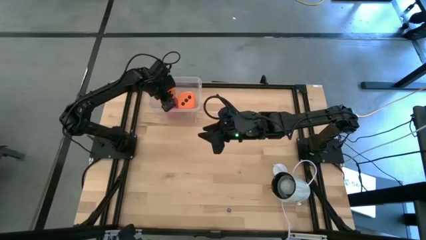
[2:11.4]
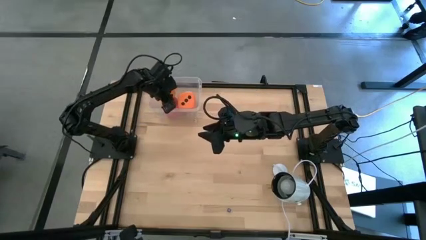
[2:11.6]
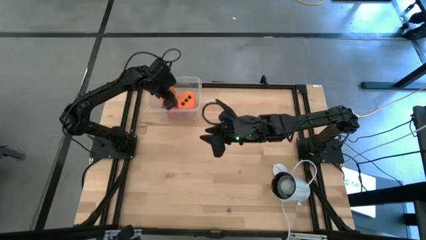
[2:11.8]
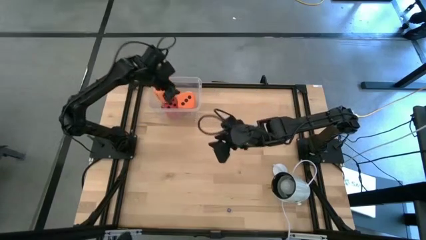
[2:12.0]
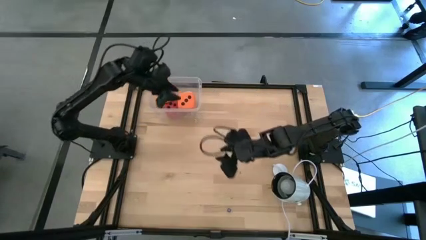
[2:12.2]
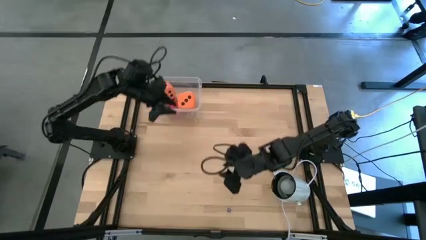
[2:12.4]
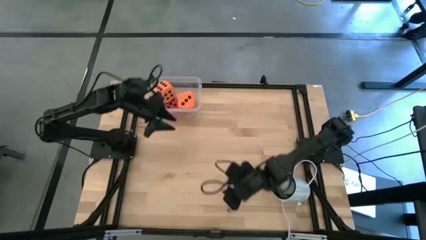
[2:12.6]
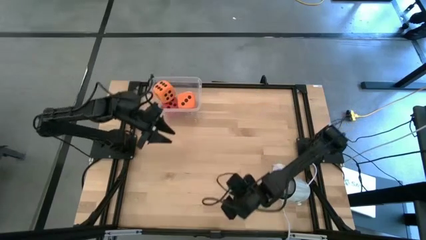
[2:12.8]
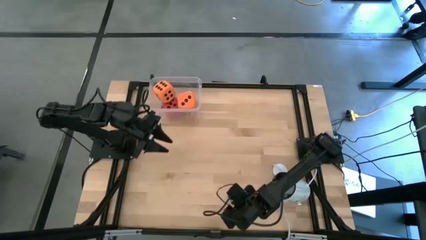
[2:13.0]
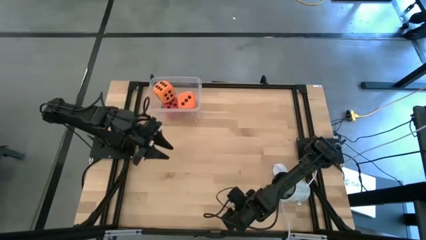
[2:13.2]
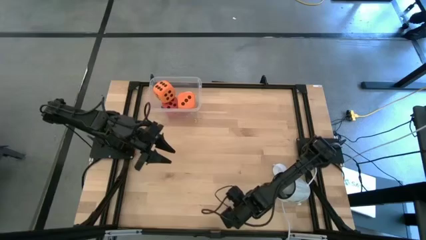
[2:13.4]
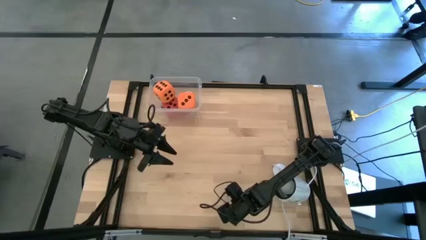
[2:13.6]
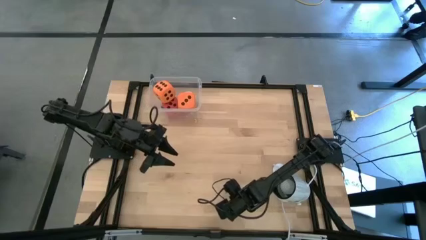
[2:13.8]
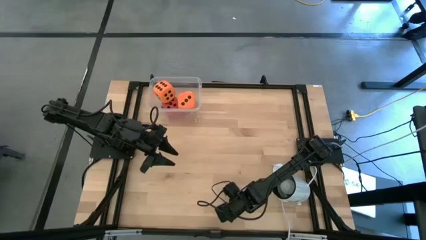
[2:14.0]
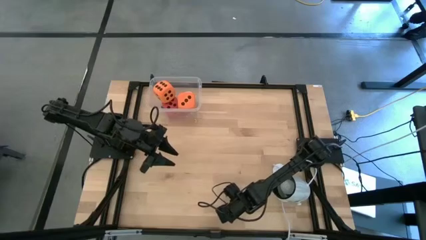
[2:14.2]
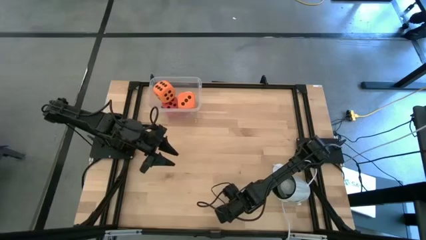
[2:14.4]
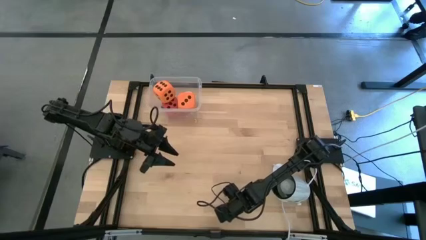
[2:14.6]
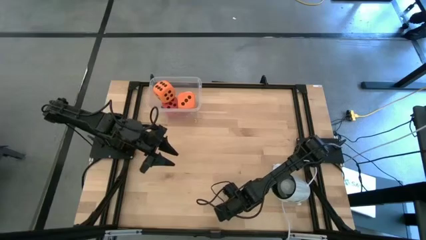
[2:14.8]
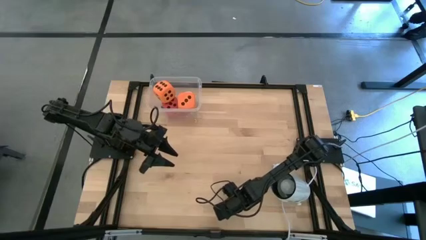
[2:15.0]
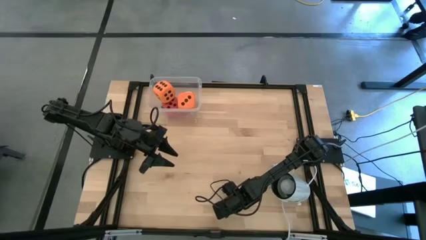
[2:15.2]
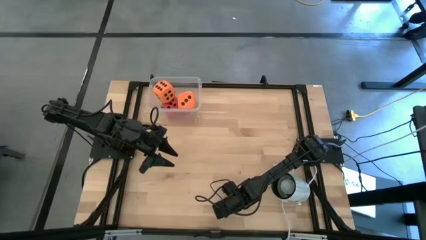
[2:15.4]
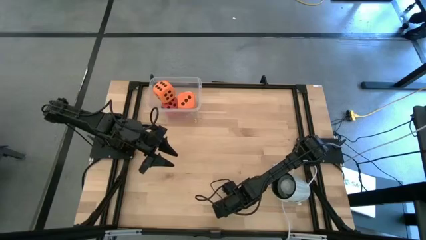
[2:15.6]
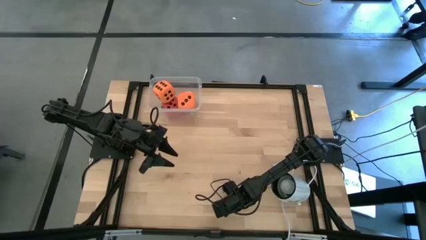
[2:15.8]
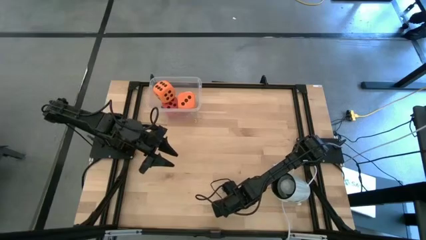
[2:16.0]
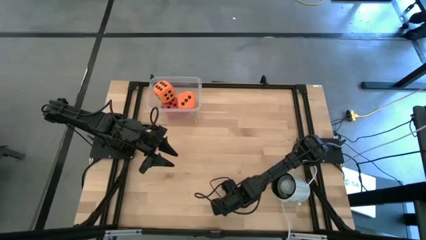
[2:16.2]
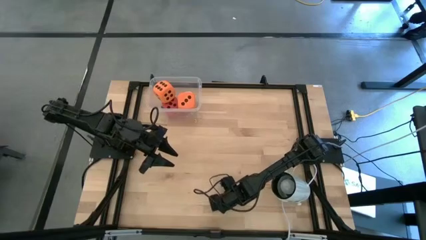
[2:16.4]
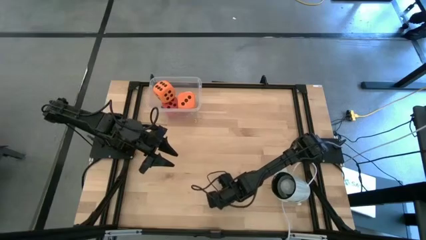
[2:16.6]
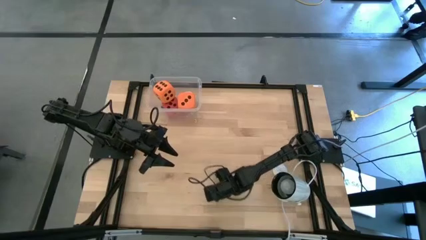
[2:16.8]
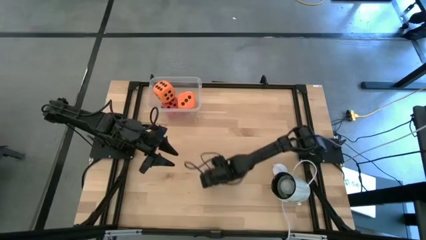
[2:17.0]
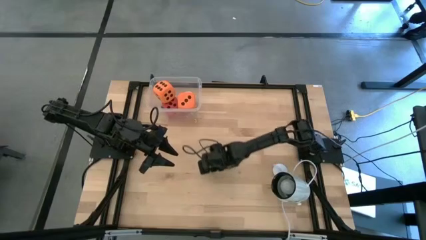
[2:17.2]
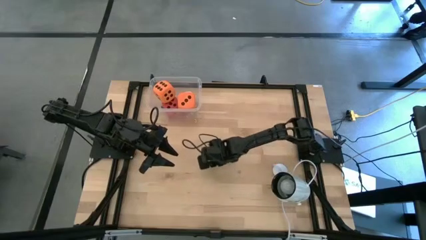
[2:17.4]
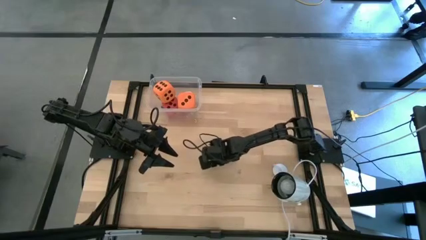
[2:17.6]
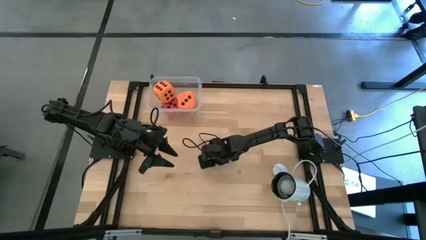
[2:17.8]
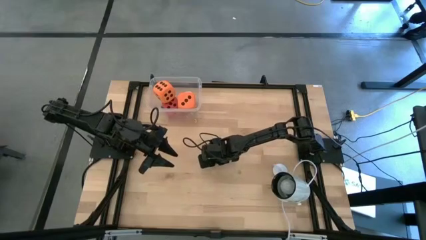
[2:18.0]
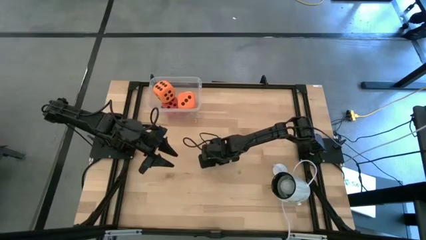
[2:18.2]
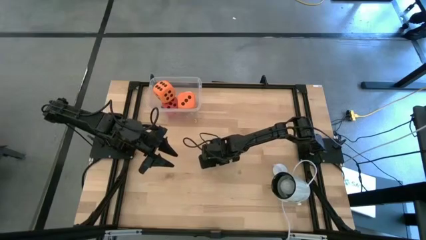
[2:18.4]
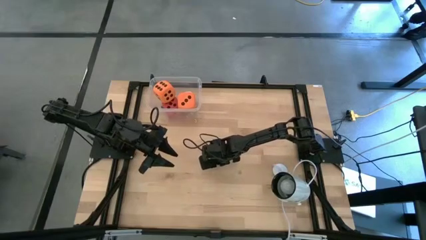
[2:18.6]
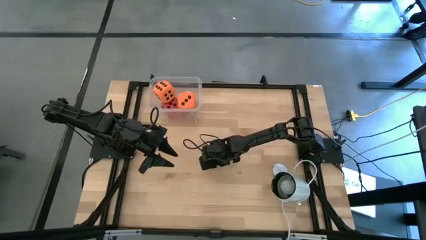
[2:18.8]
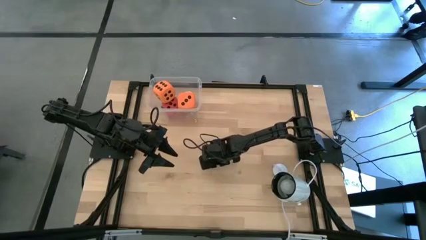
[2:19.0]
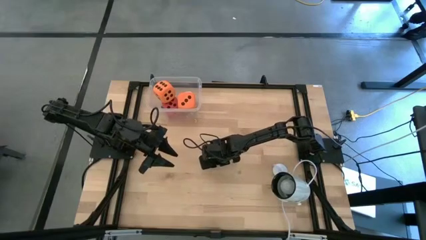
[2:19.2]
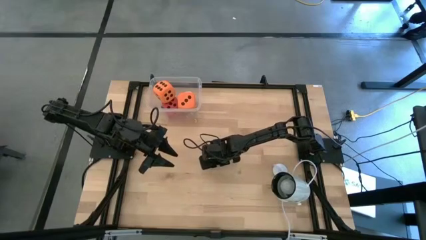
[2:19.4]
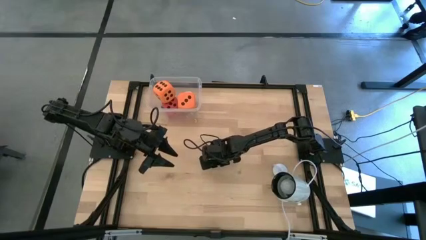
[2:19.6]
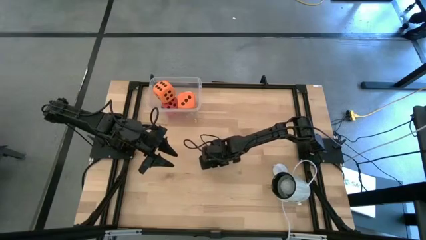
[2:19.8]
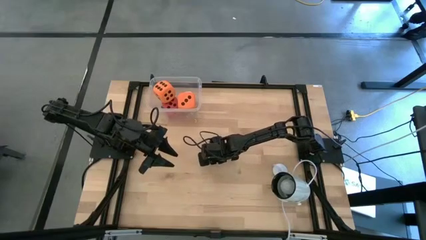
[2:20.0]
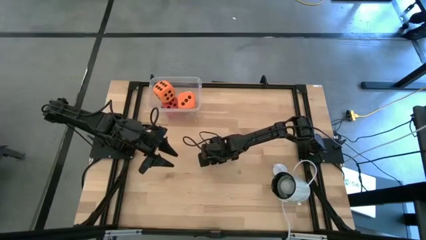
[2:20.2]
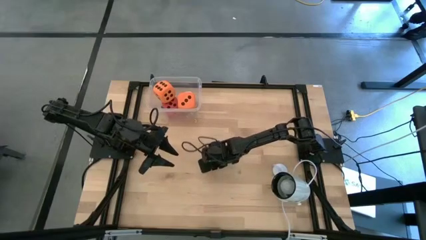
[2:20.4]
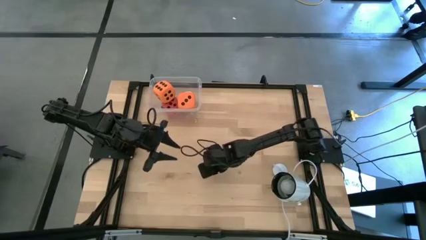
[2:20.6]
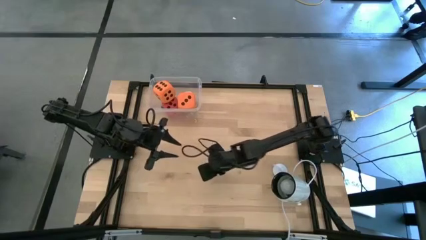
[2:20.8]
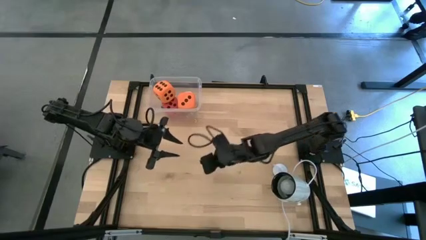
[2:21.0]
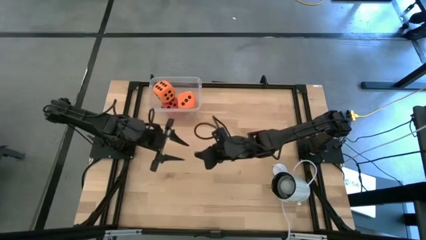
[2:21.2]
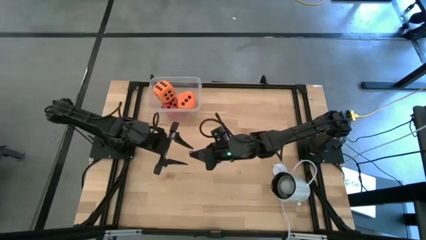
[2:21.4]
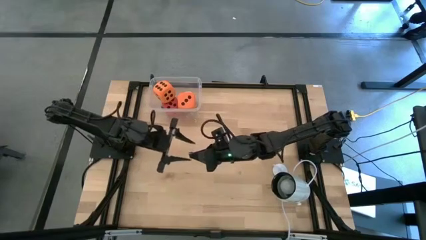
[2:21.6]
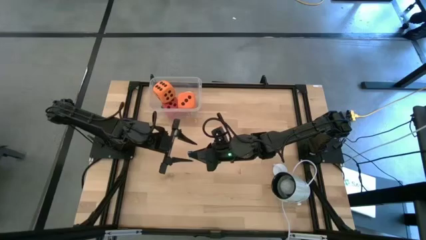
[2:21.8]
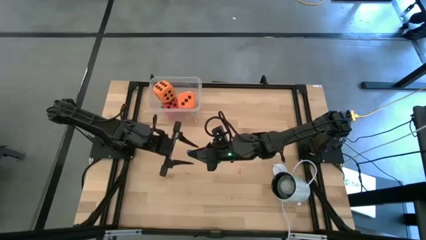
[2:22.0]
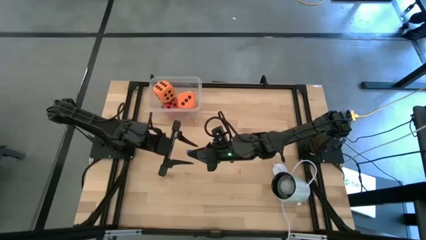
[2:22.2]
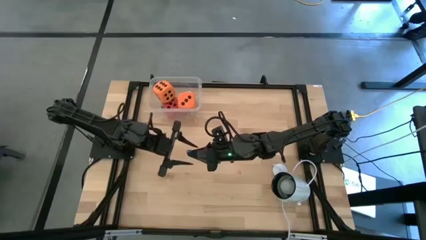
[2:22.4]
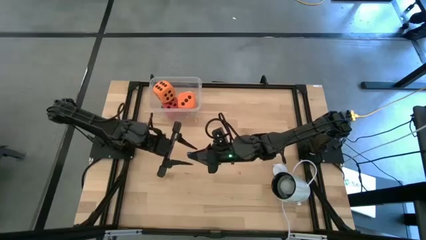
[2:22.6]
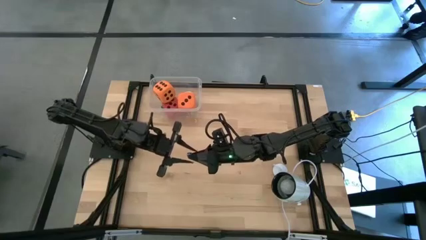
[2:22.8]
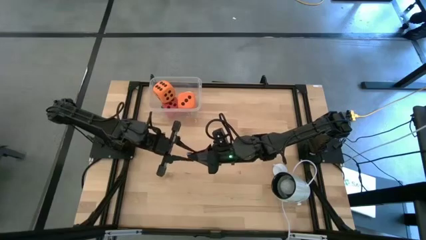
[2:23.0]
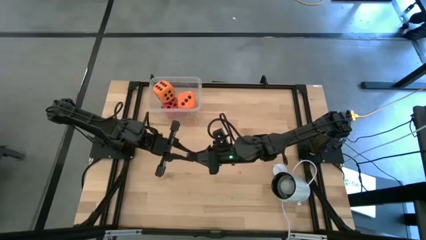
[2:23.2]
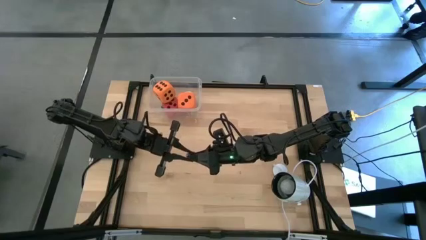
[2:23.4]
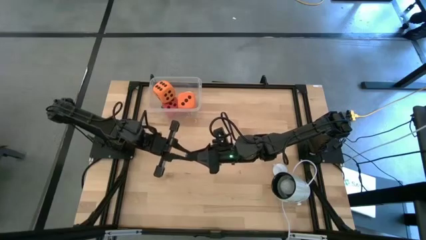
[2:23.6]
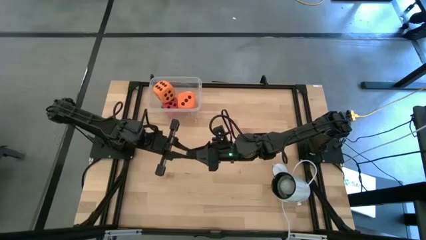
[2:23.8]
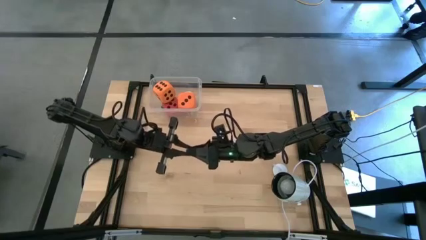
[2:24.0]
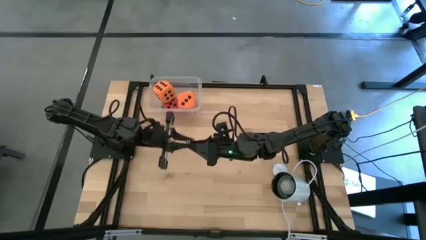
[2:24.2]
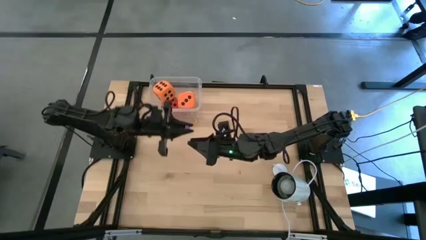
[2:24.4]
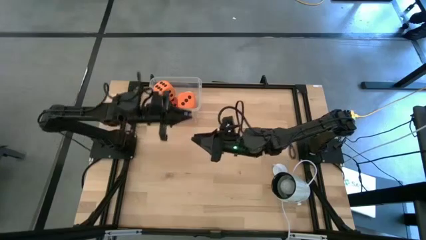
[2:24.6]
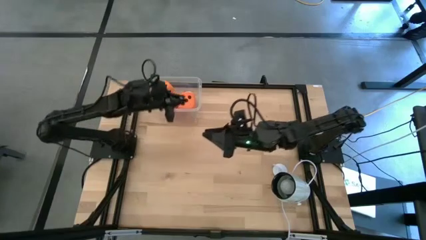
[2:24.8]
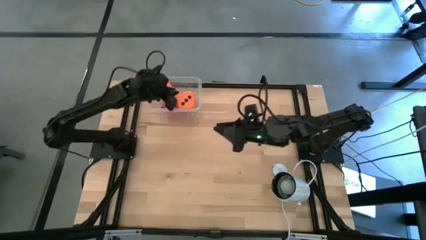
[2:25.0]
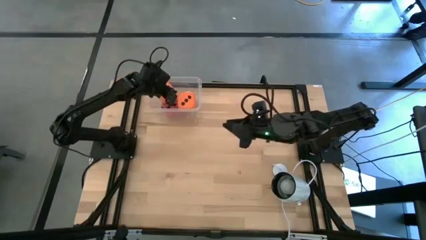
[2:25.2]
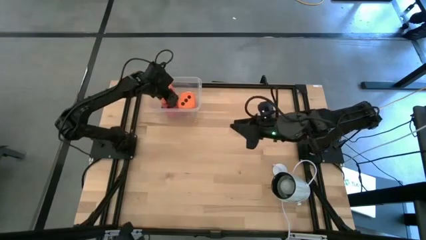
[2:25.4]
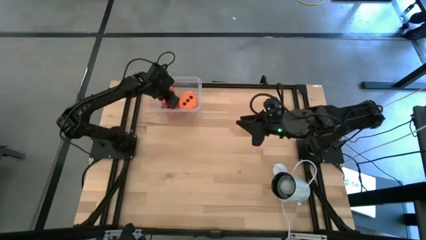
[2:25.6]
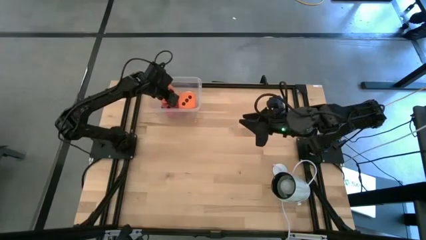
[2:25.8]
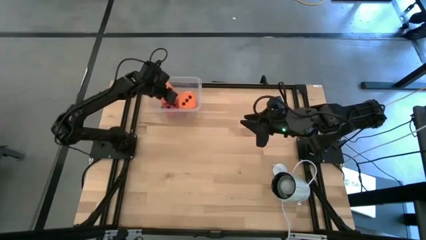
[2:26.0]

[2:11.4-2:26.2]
Task: Pick & Place Dice
Put the small blue die into the transparent bin
